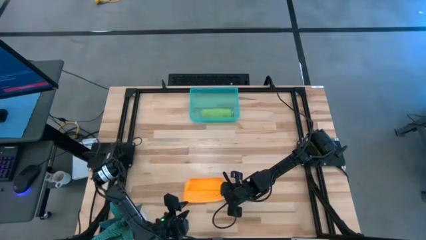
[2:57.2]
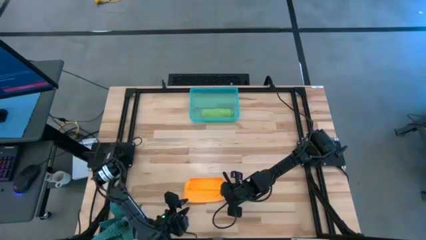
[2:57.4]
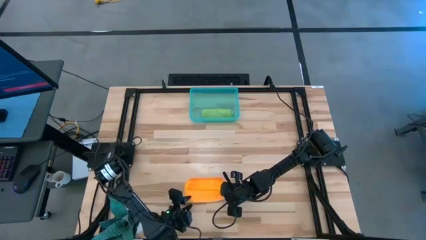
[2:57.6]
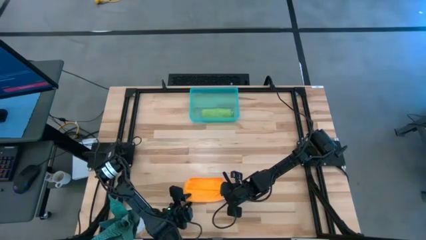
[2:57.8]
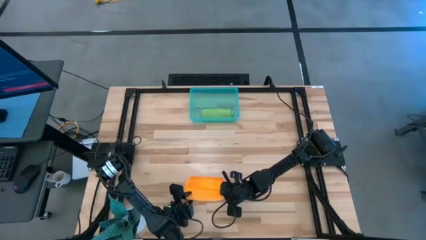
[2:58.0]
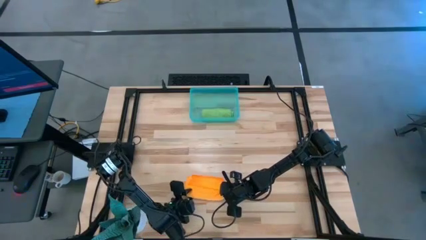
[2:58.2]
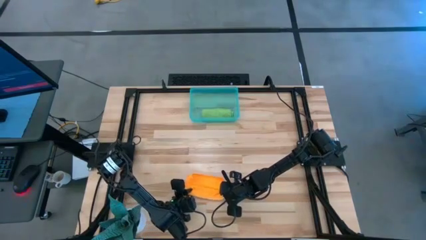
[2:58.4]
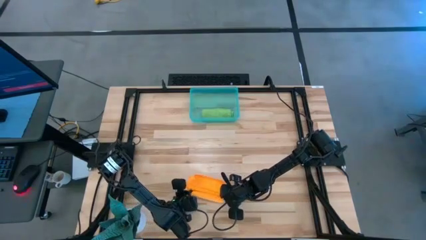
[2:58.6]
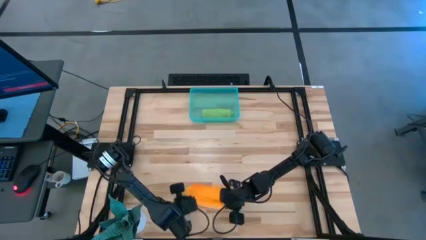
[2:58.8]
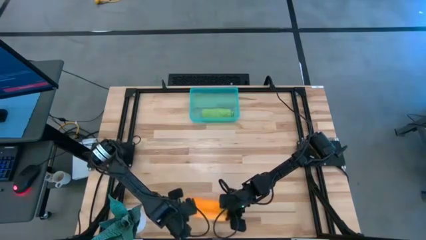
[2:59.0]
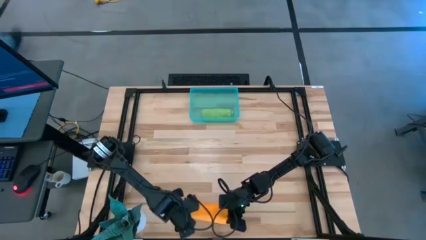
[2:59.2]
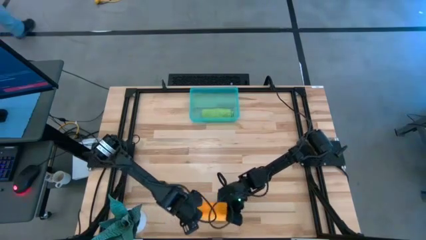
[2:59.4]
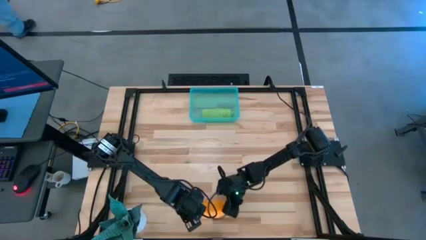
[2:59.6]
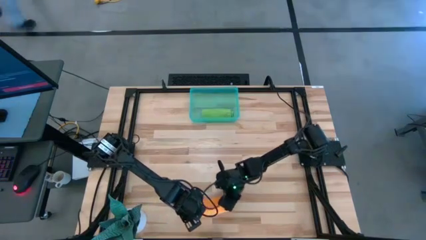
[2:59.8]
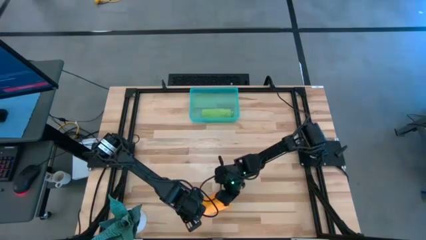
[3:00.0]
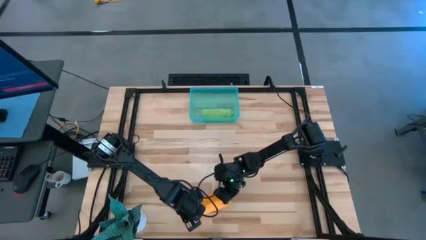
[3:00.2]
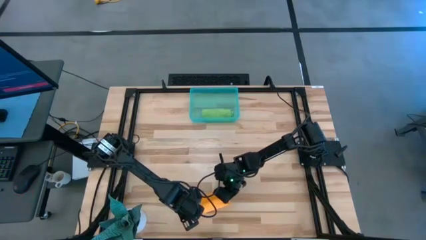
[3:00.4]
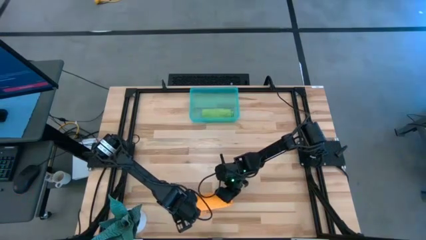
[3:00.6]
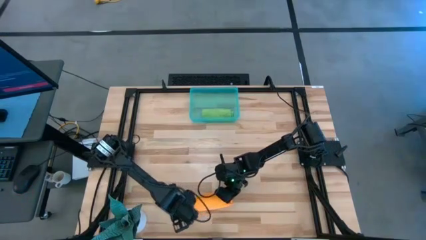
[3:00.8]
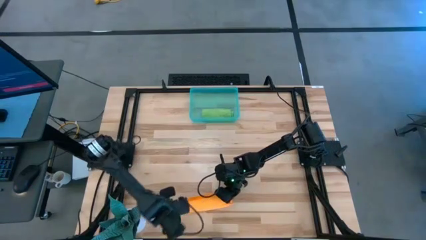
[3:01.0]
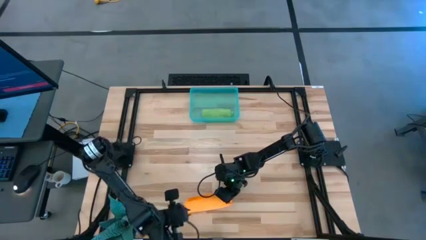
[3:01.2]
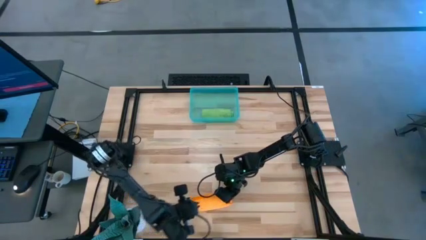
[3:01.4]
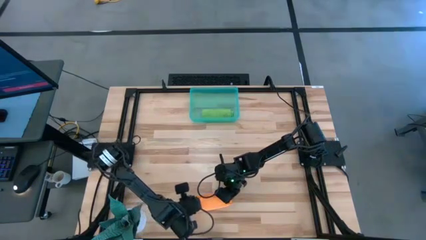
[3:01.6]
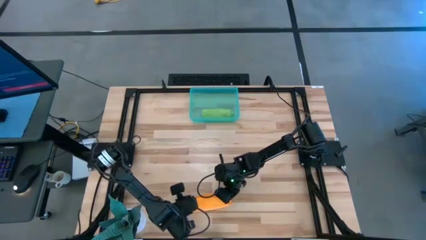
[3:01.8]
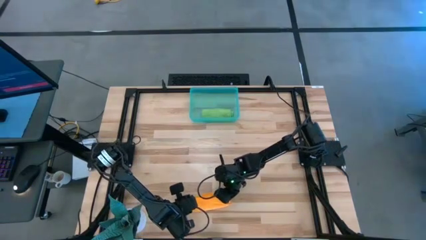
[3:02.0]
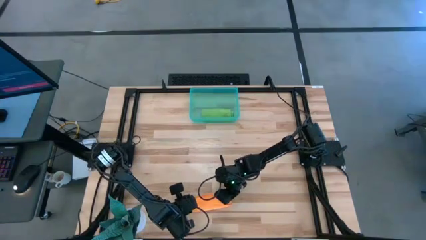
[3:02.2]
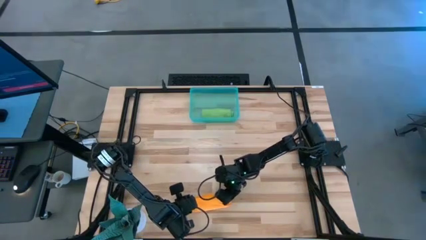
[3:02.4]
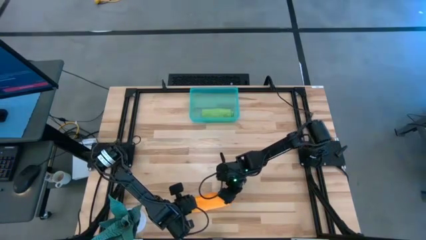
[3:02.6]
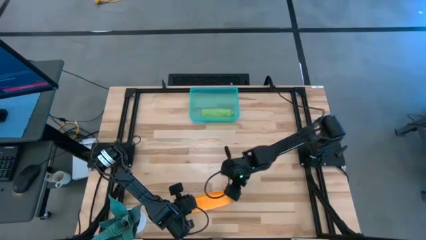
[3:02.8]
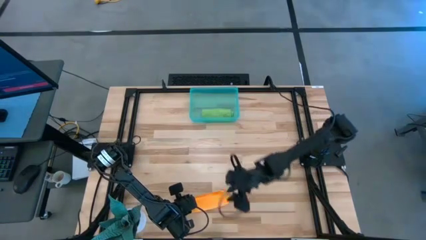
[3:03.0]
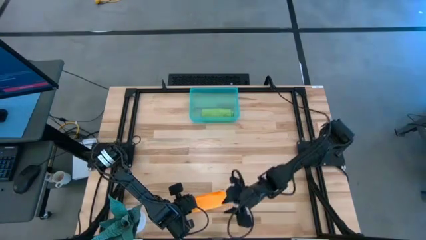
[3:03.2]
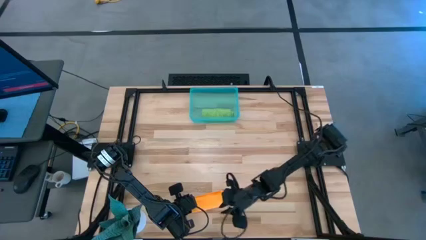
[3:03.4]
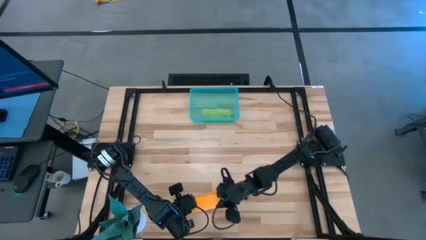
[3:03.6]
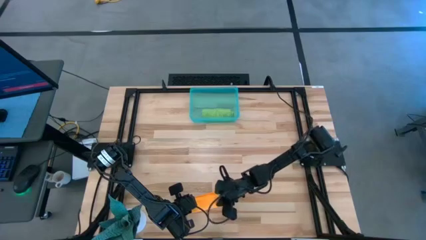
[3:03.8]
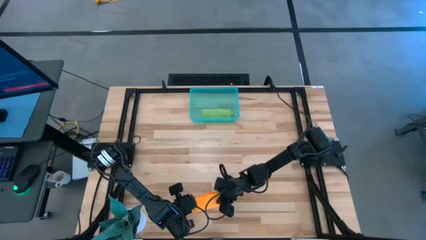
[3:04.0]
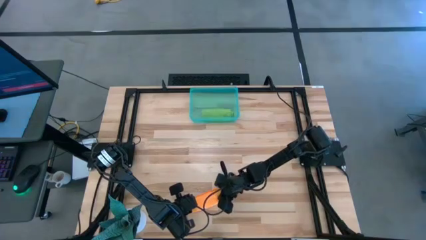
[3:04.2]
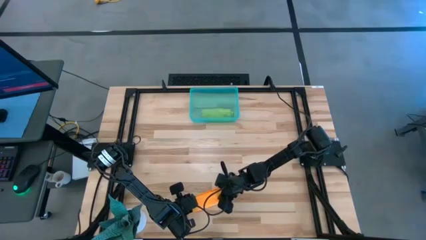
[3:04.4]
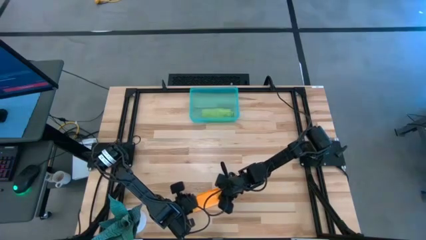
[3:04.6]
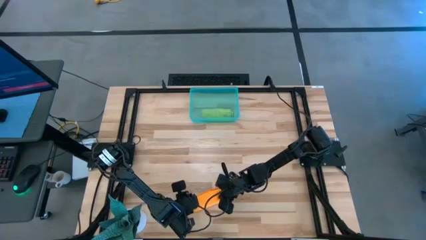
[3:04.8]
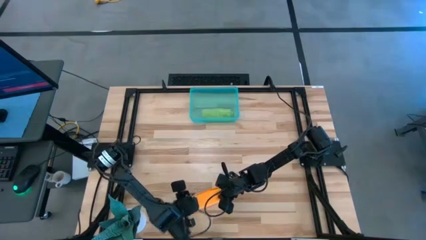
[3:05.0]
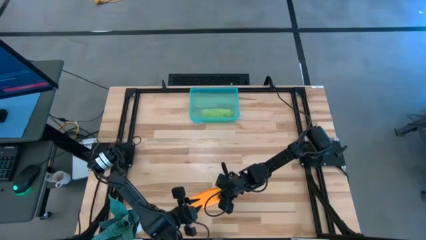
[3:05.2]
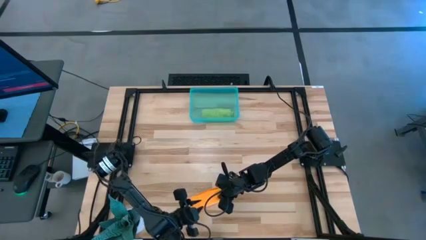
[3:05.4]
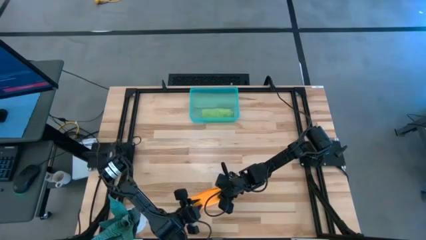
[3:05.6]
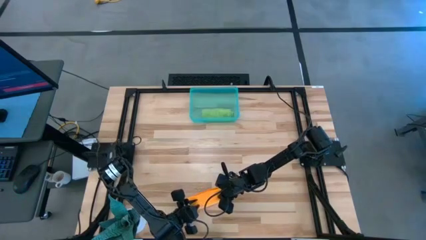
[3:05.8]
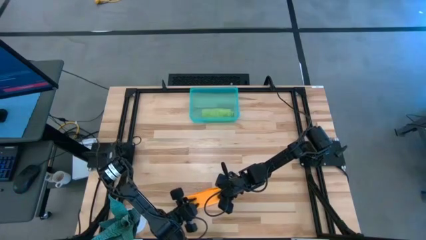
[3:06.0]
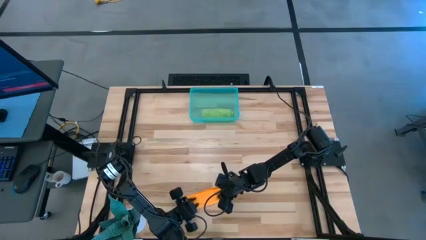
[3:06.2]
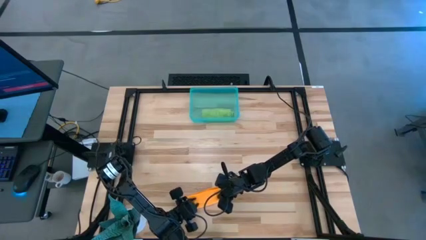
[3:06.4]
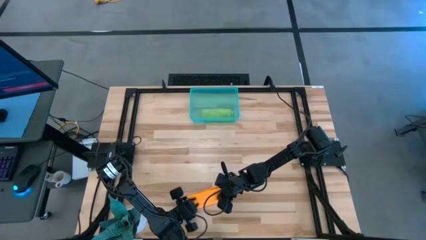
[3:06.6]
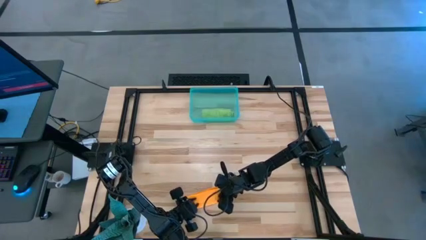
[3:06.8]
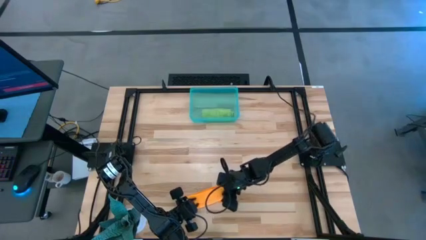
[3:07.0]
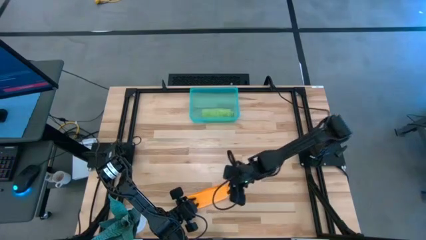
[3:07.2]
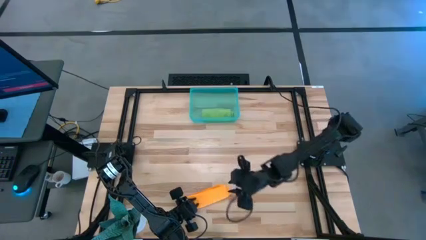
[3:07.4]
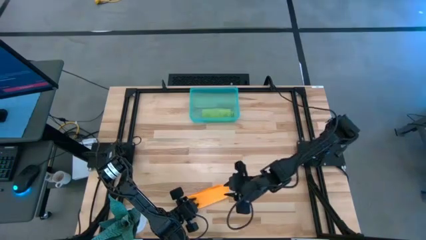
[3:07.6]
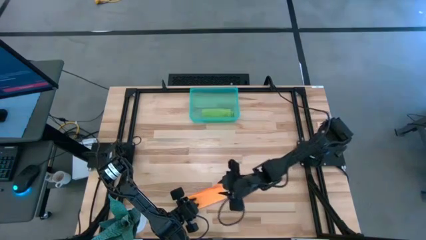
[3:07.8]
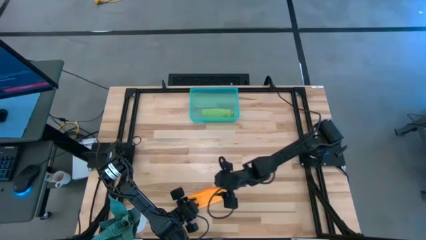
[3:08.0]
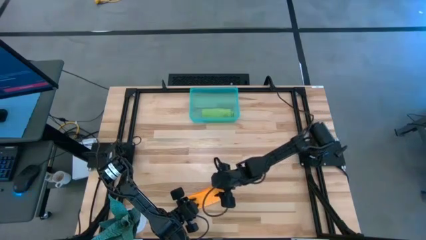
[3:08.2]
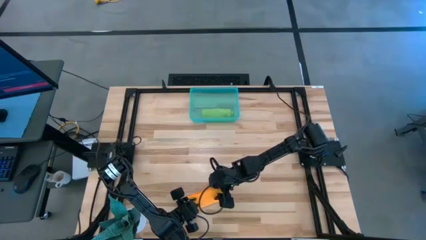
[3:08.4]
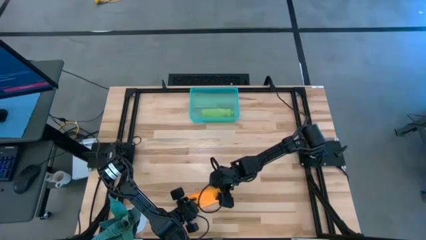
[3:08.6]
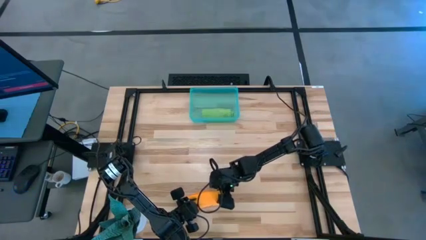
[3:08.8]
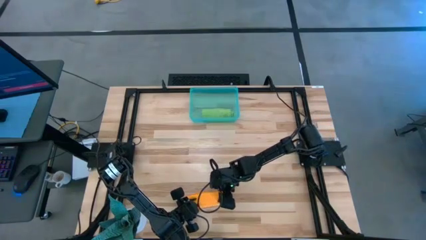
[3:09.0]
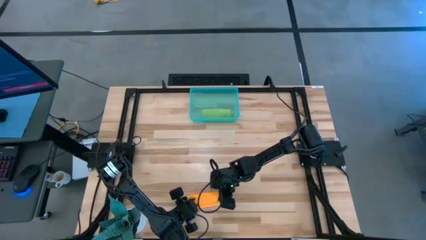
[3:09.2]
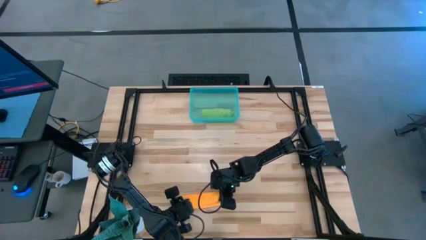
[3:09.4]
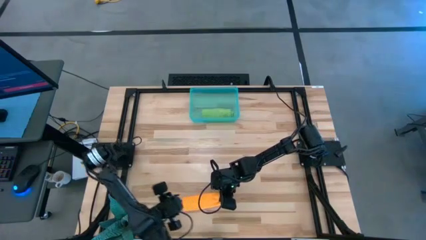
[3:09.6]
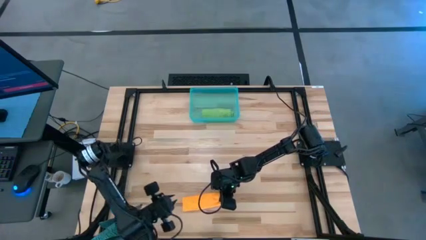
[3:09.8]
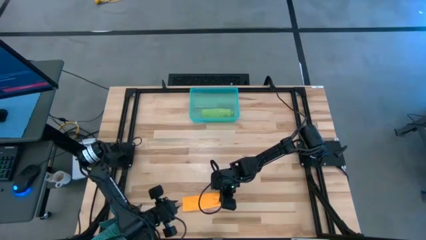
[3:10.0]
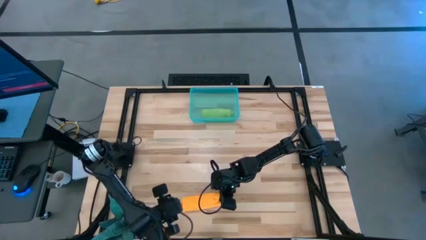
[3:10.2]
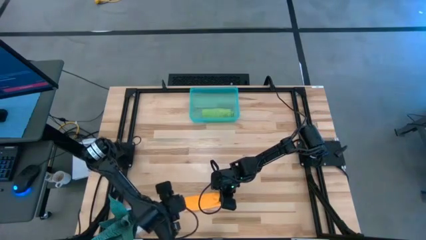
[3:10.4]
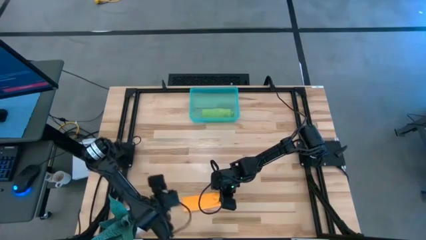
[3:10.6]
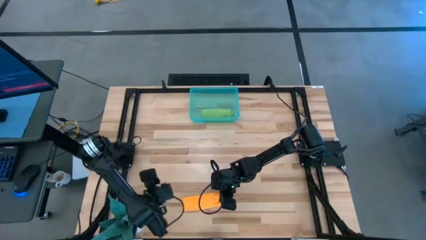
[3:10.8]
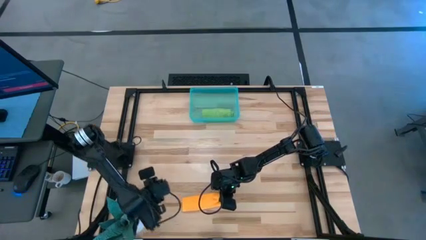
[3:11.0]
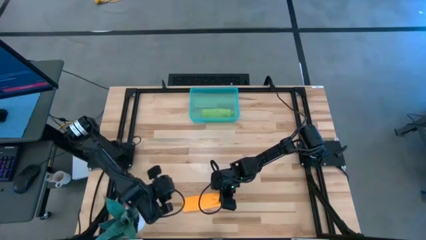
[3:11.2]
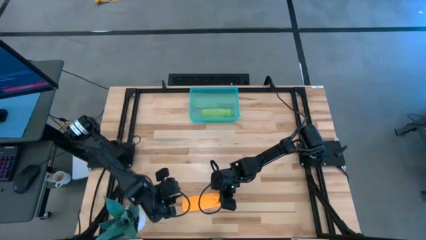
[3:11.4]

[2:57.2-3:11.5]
Task: Roll microfiber towels into tight, uniform cylinder then place into a basket
Roll the orange towel
